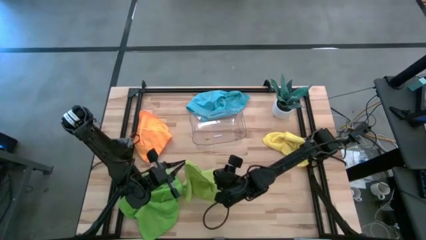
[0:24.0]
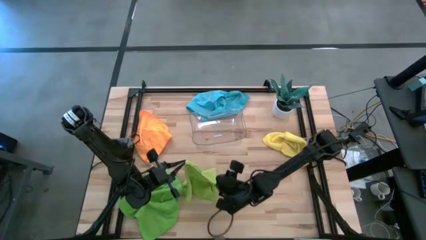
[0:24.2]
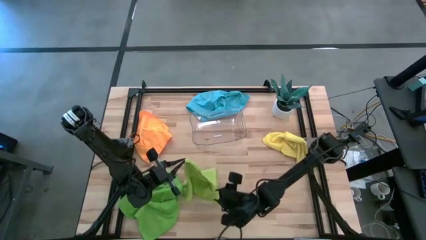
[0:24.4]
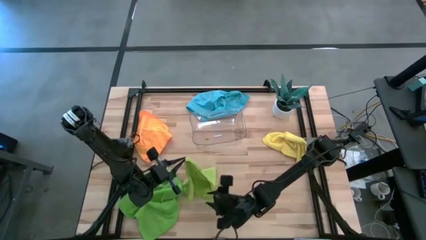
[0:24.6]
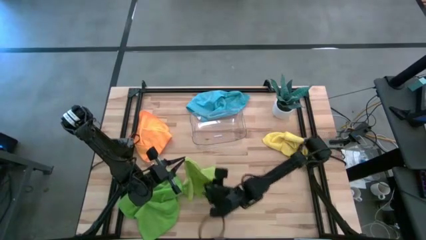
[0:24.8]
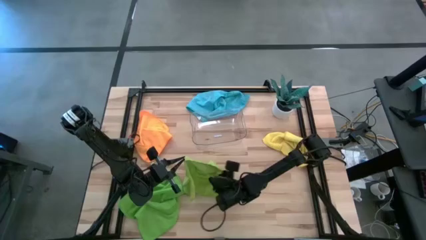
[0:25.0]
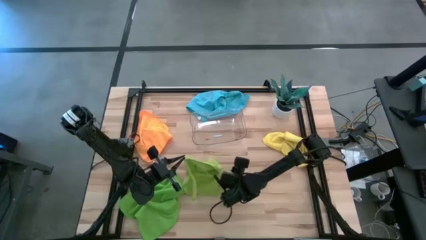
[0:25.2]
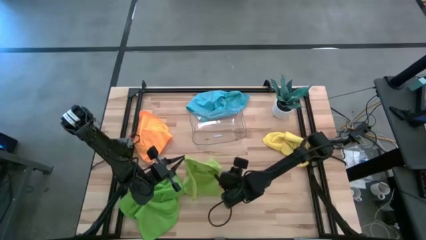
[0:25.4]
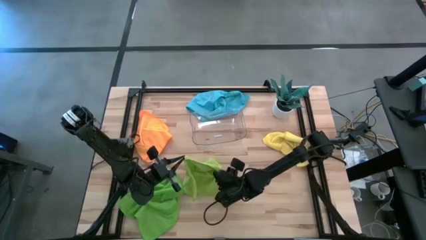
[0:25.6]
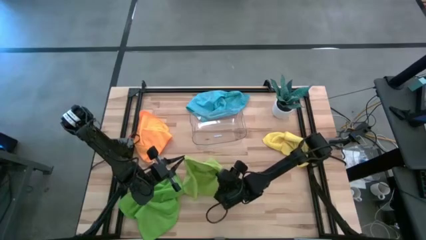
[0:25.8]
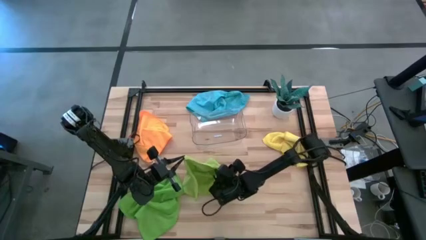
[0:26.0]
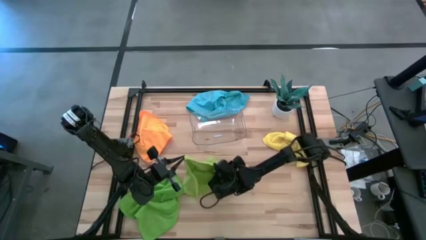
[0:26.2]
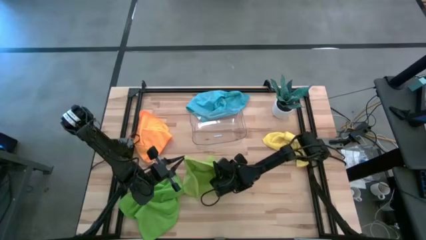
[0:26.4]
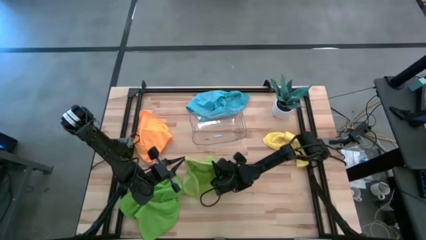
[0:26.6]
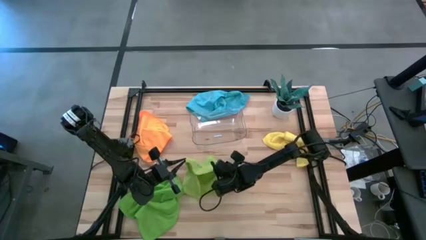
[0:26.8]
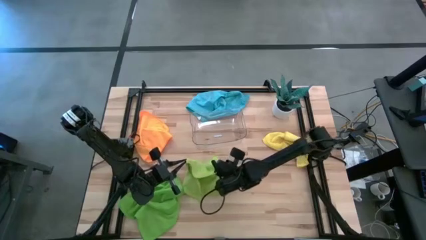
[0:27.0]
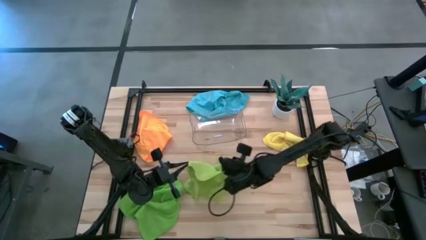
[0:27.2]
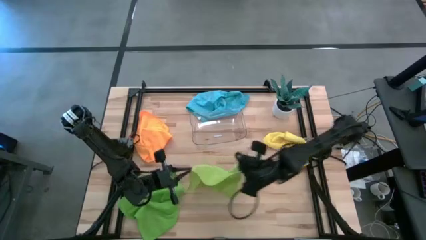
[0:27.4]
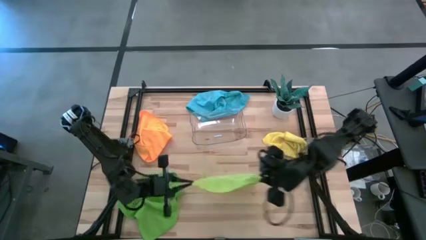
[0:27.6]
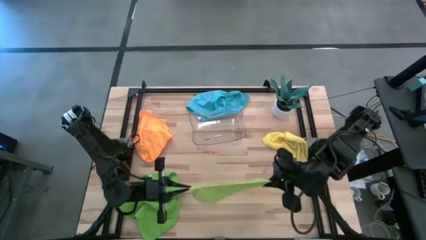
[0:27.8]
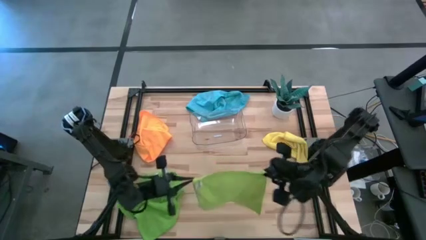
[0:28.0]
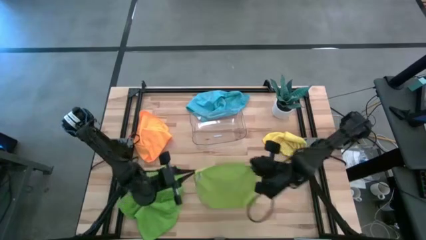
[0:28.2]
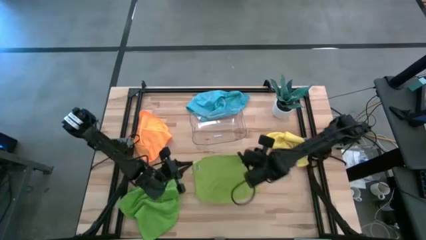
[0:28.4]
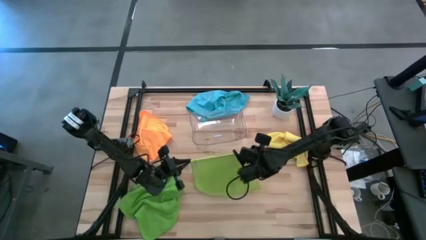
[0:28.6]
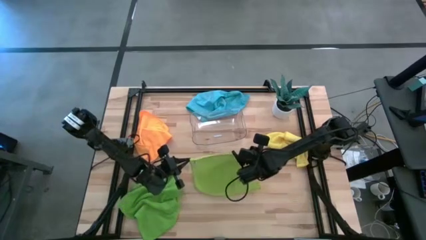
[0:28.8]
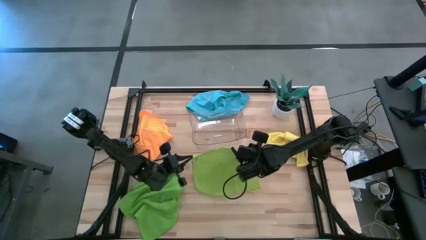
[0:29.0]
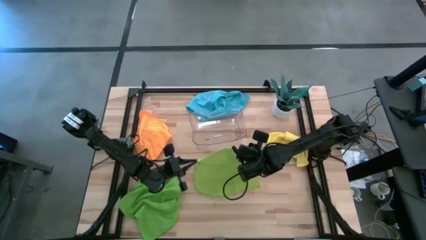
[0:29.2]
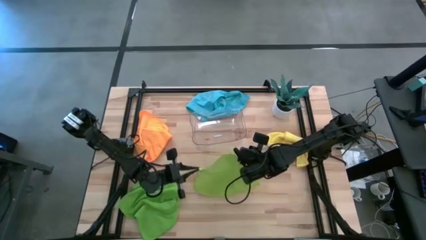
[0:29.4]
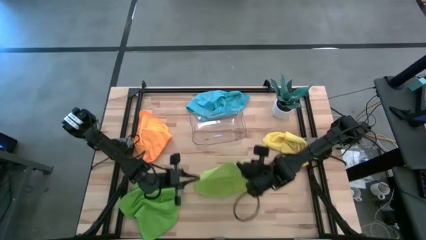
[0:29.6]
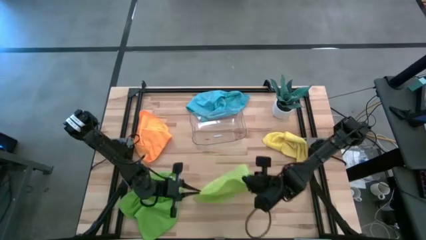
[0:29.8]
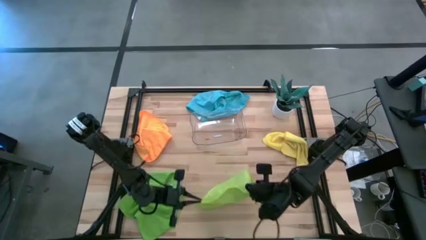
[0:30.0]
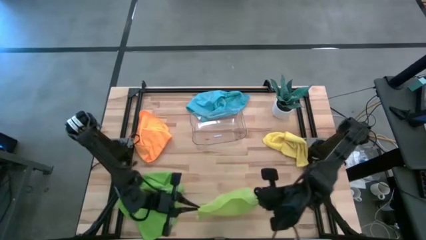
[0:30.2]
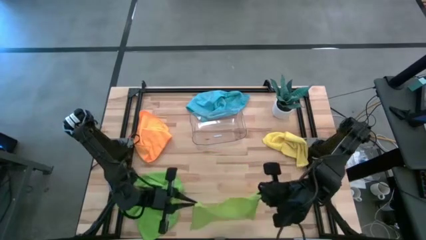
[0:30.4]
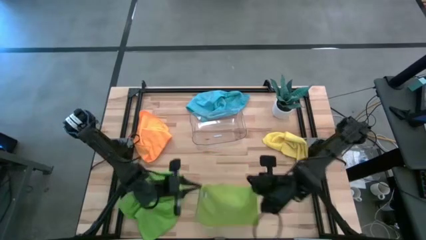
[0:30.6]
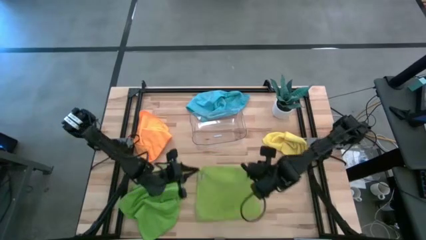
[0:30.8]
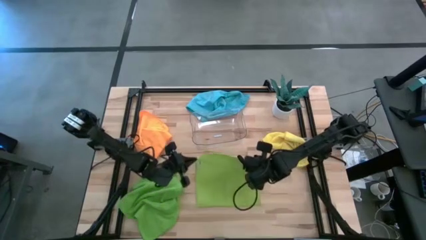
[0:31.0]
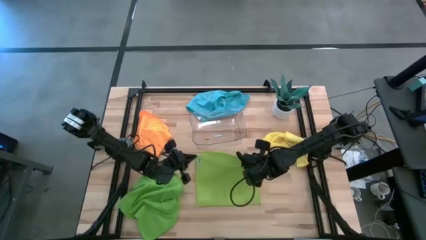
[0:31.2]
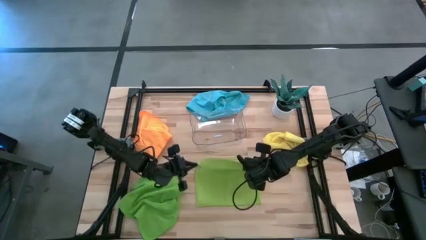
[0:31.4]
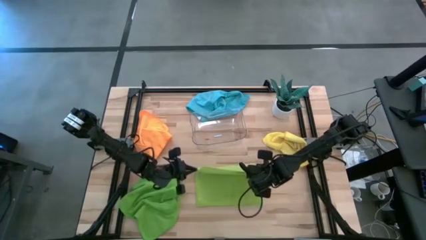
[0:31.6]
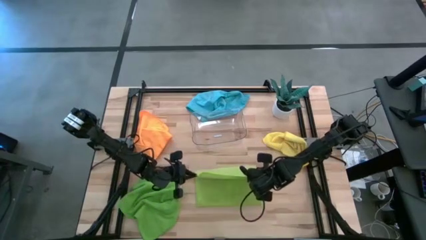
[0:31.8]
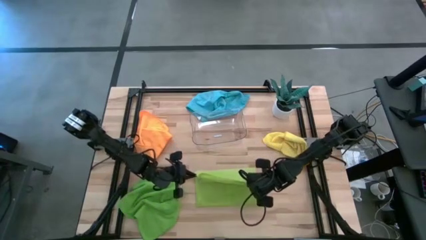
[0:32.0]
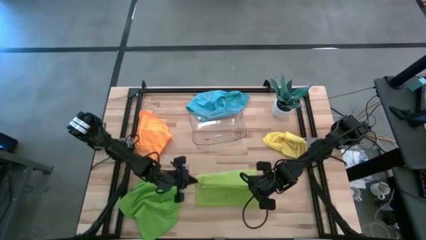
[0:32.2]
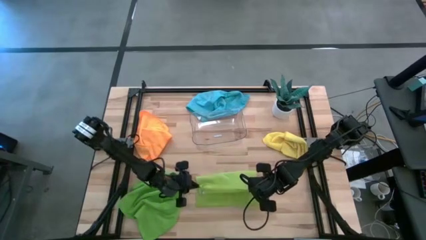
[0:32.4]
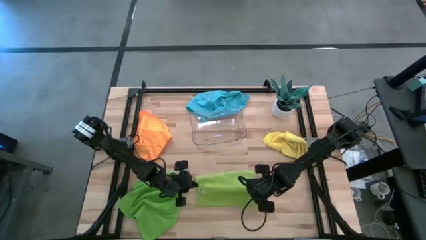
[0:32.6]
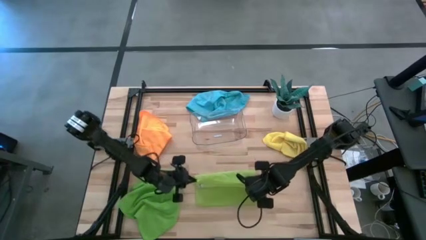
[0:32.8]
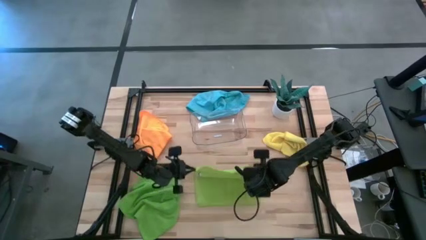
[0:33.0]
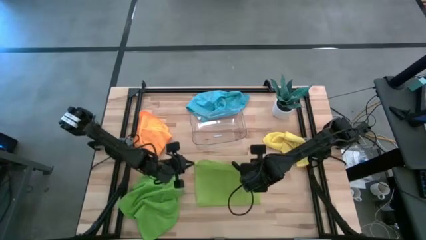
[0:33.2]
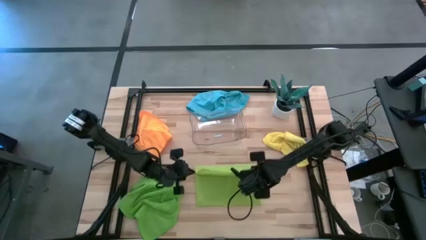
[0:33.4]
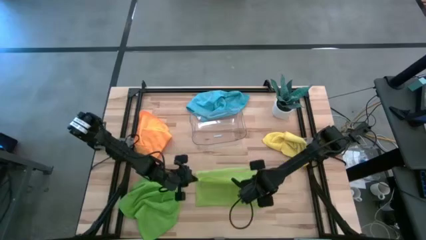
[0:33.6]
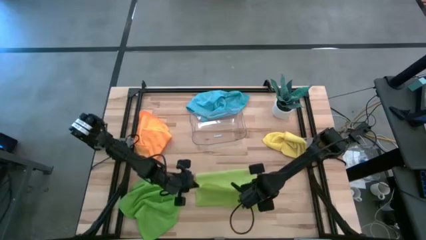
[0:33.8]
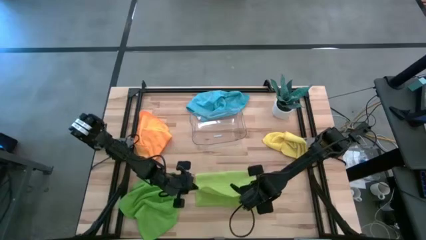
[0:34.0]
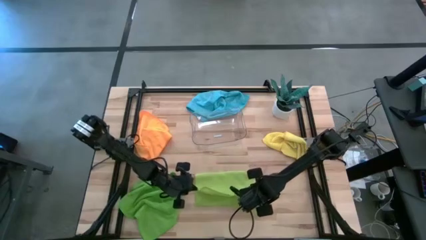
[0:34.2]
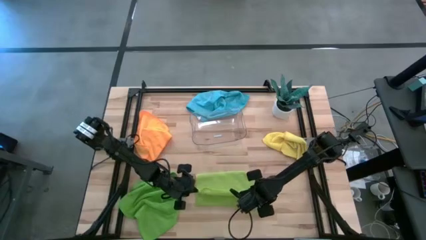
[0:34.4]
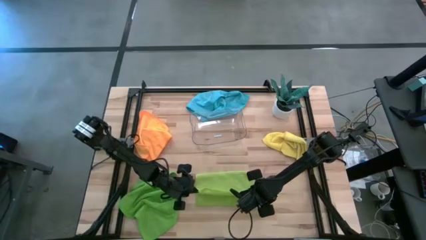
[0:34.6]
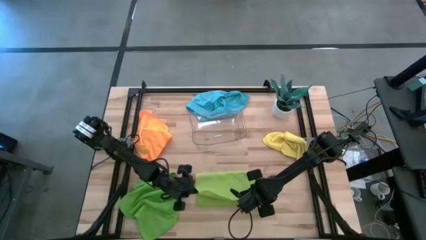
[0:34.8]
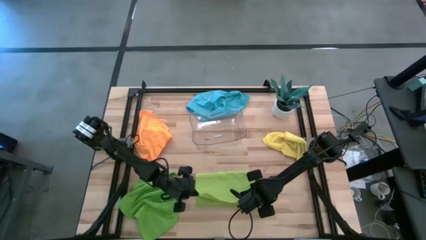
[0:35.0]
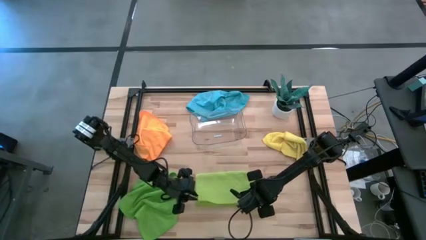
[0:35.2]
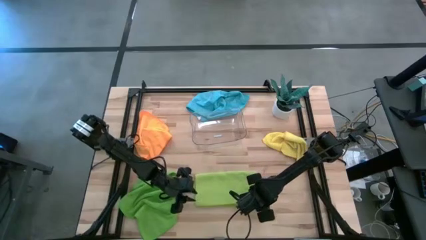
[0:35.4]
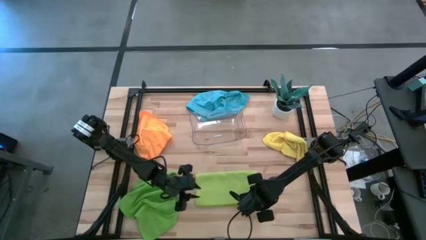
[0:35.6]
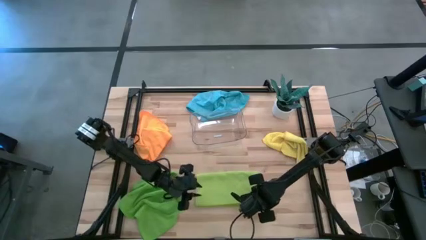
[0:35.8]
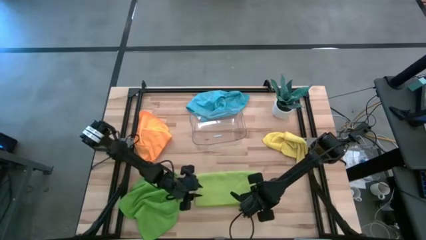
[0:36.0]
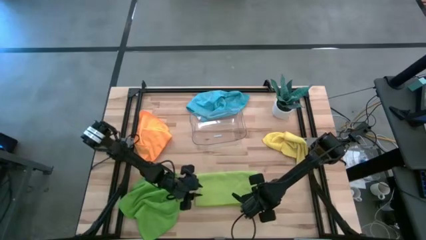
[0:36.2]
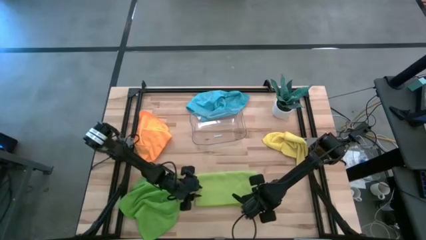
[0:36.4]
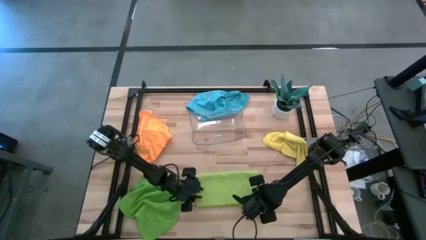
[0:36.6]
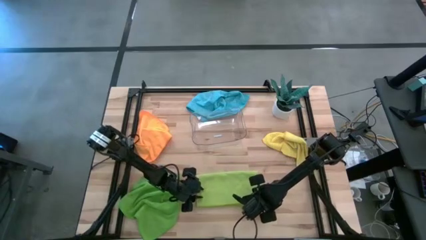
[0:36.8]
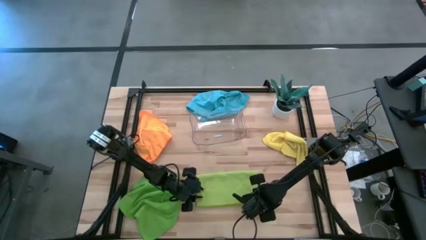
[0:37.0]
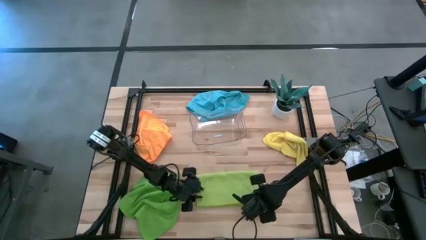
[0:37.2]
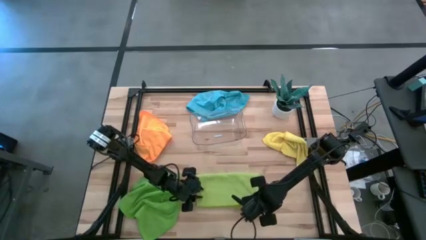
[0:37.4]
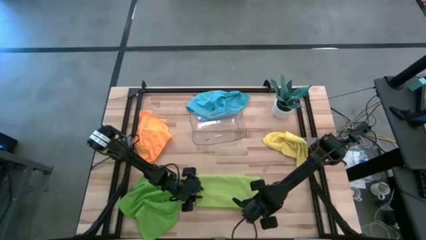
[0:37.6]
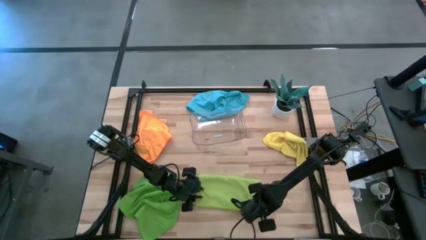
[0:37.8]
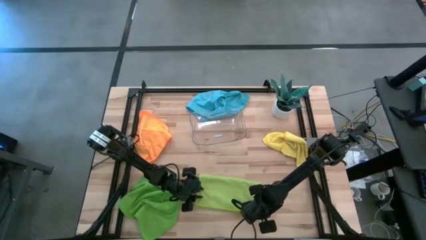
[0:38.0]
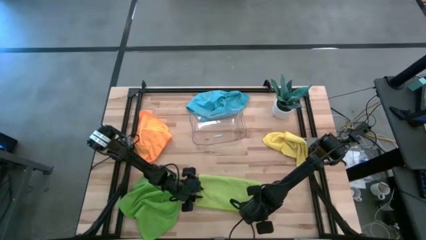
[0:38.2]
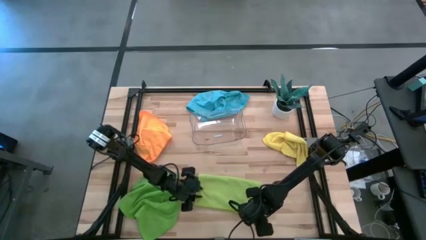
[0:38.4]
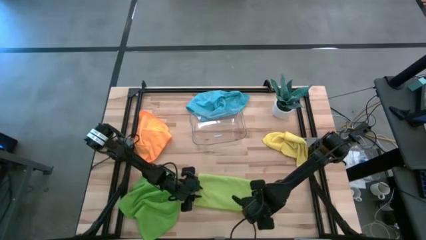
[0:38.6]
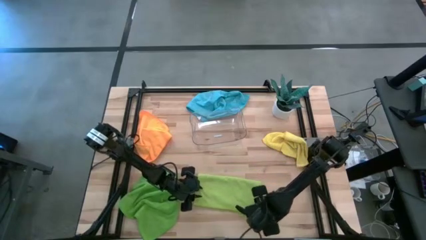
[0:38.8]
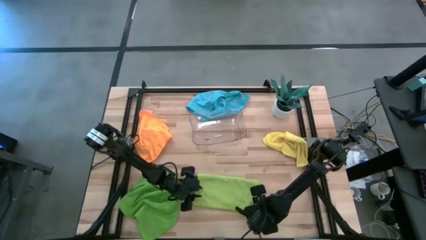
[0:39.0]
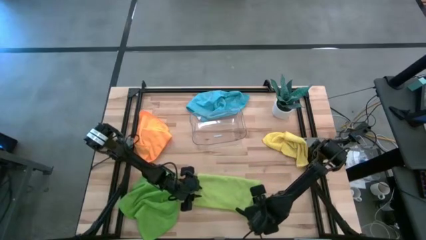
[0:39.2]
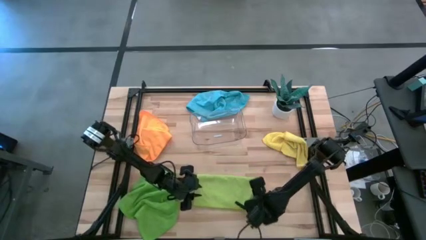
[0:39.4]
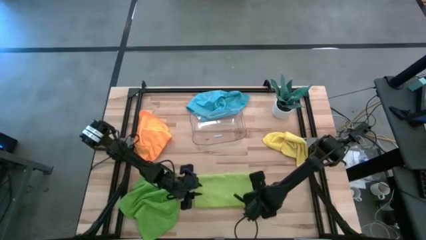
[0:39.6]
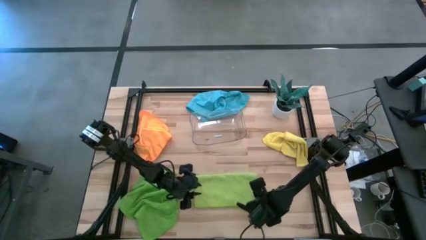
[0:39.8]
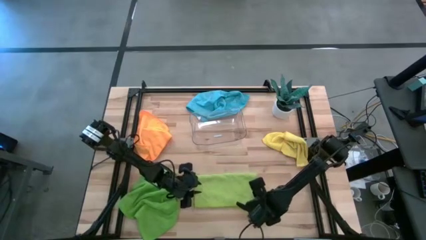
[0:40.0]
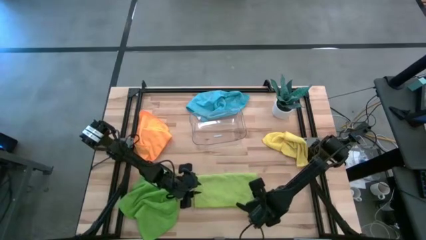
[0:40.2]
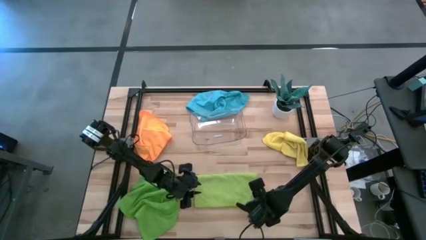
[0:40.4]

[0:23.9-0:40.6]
Task: Fold microfiber towels
Fold the light green microfiber cloth
